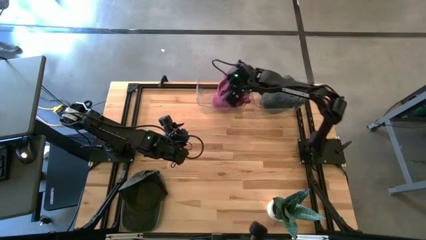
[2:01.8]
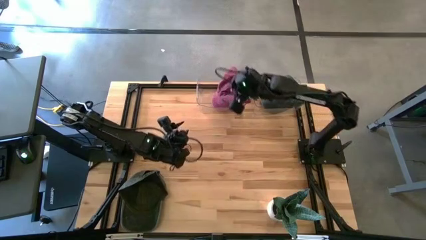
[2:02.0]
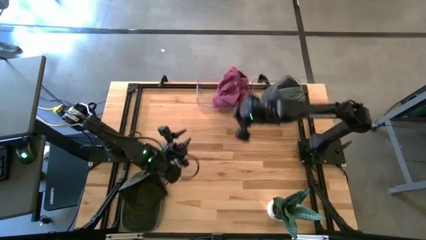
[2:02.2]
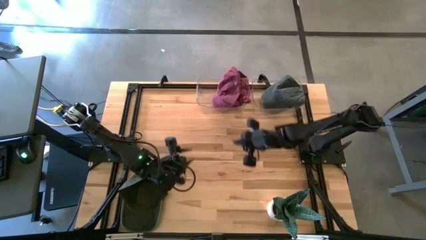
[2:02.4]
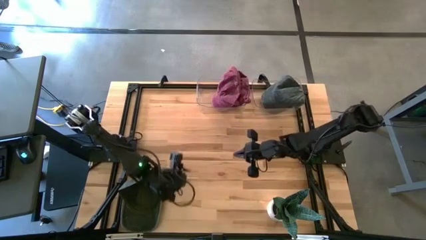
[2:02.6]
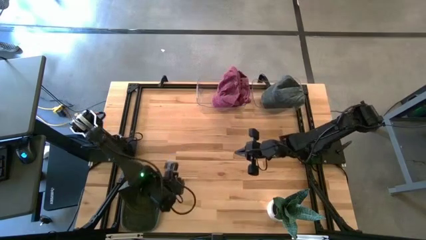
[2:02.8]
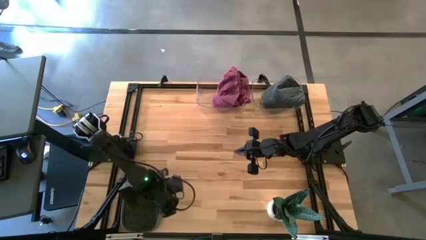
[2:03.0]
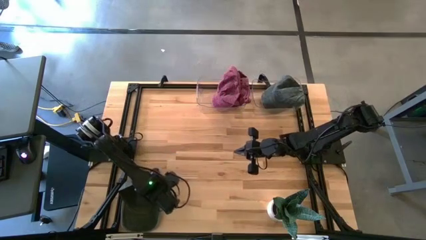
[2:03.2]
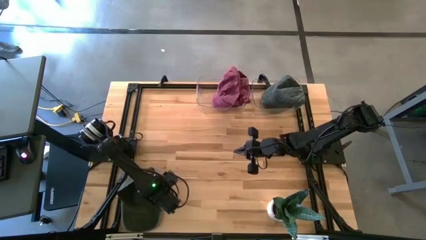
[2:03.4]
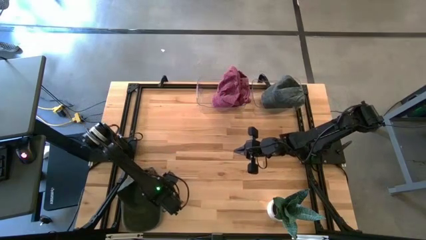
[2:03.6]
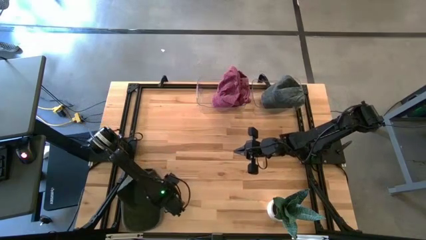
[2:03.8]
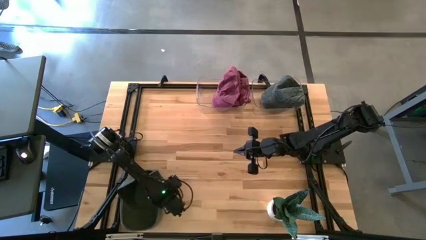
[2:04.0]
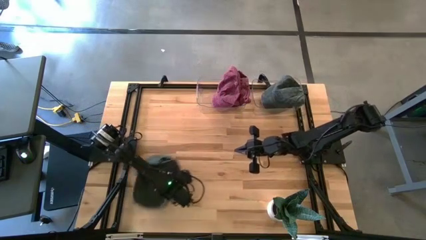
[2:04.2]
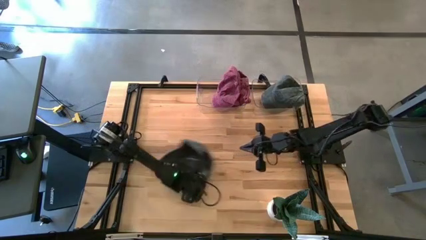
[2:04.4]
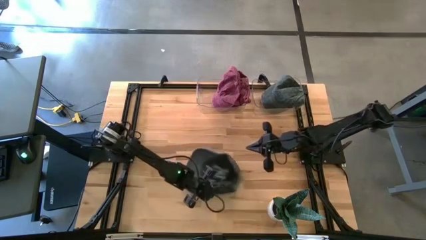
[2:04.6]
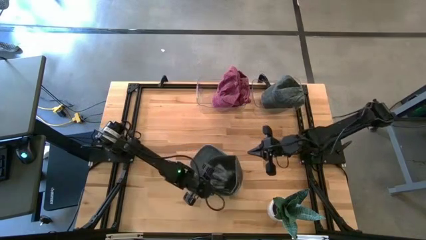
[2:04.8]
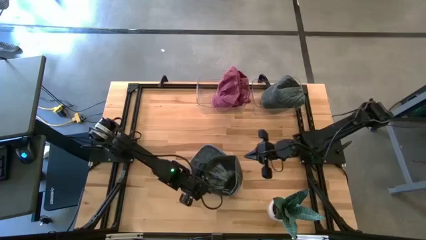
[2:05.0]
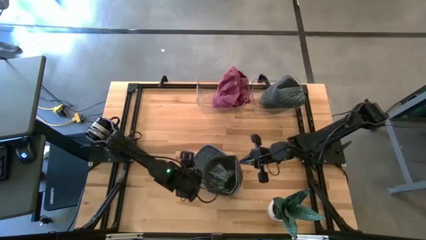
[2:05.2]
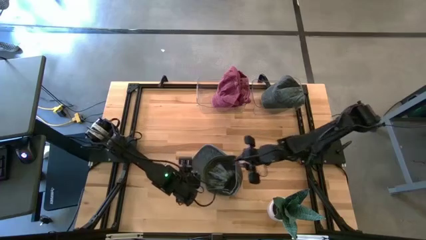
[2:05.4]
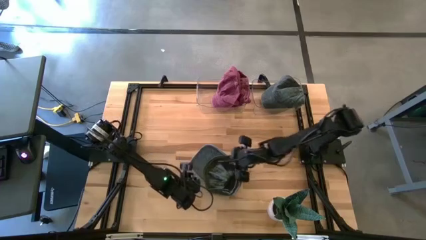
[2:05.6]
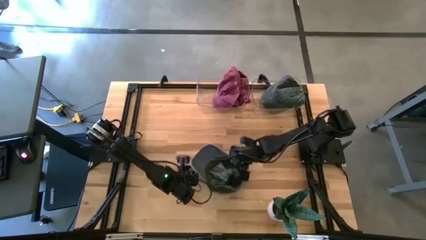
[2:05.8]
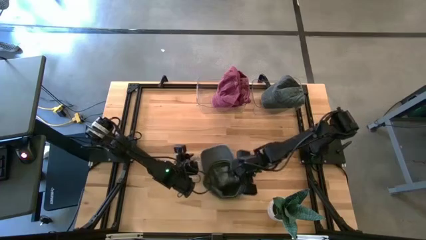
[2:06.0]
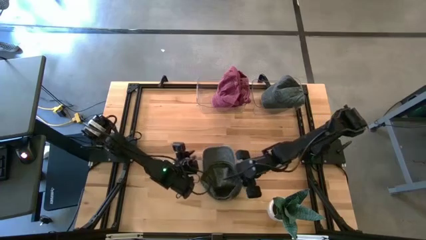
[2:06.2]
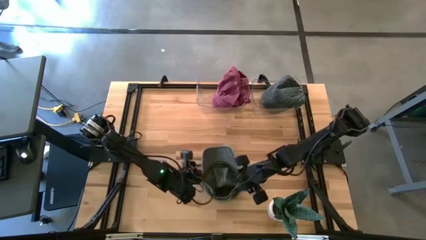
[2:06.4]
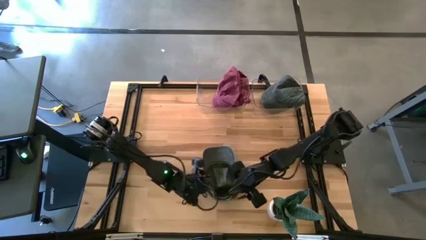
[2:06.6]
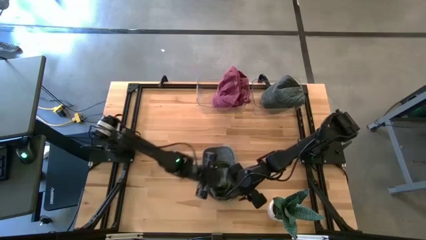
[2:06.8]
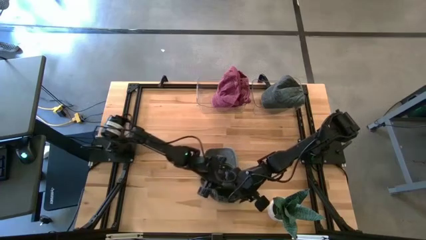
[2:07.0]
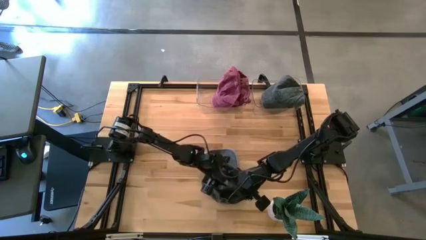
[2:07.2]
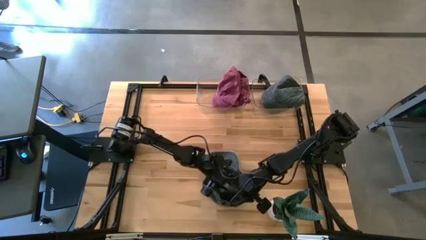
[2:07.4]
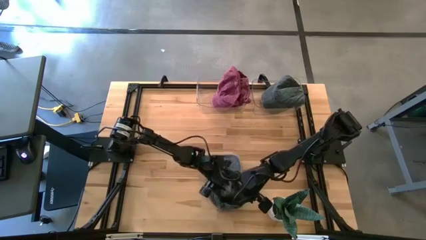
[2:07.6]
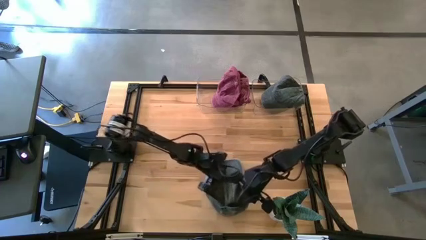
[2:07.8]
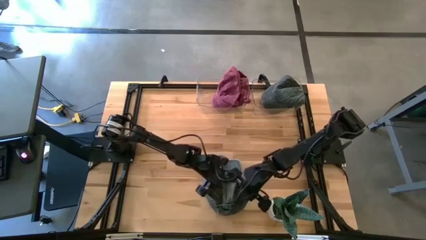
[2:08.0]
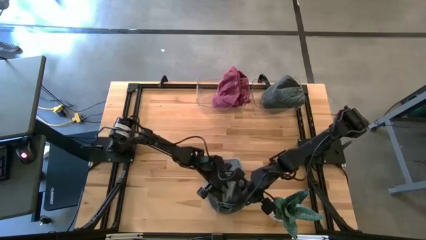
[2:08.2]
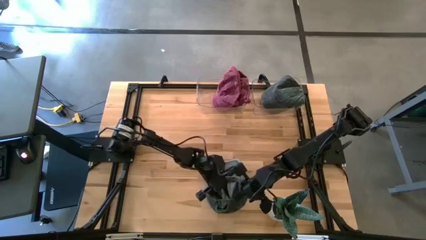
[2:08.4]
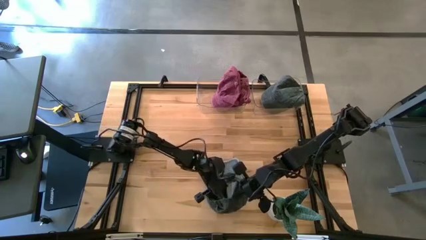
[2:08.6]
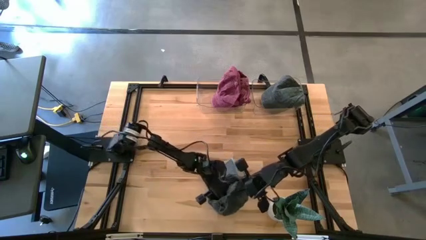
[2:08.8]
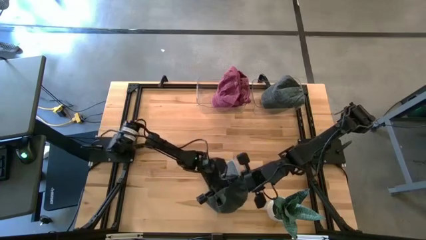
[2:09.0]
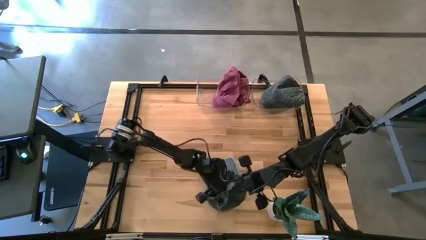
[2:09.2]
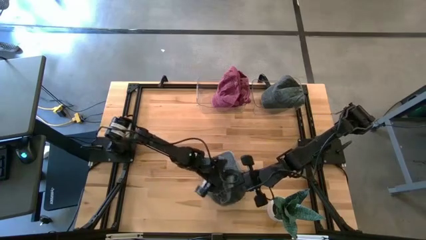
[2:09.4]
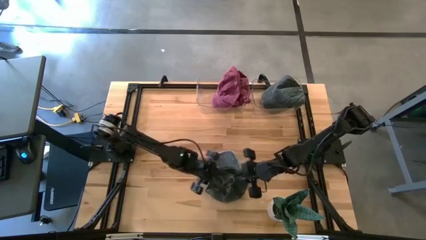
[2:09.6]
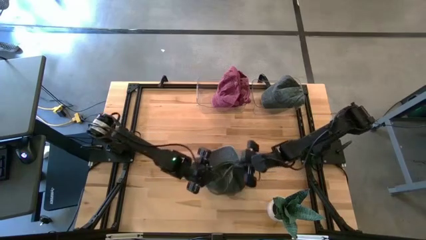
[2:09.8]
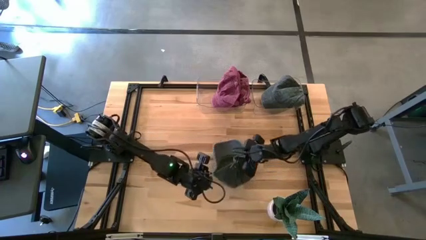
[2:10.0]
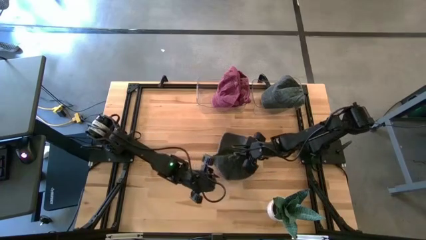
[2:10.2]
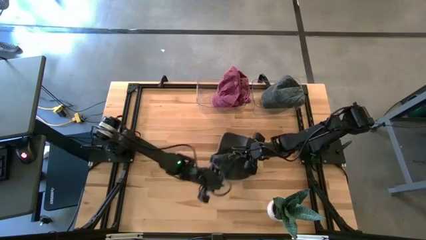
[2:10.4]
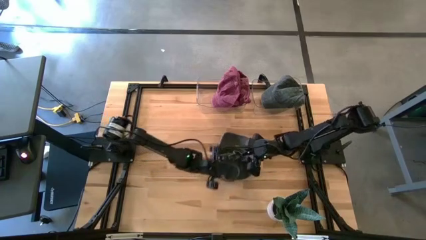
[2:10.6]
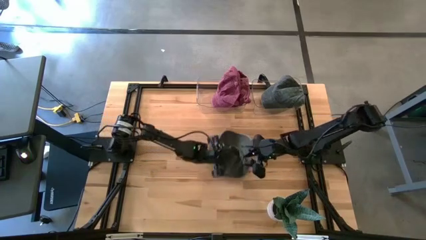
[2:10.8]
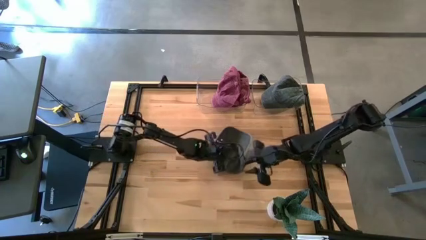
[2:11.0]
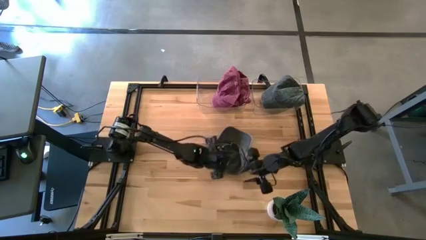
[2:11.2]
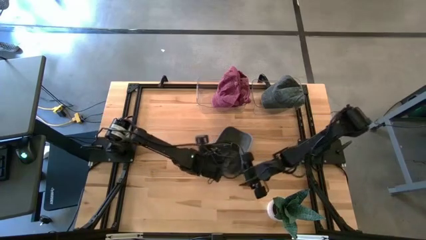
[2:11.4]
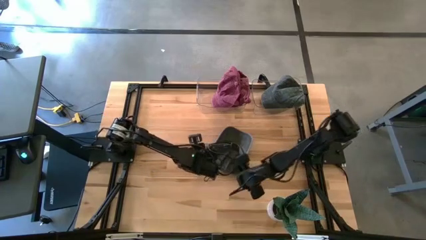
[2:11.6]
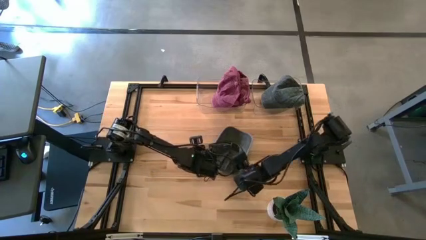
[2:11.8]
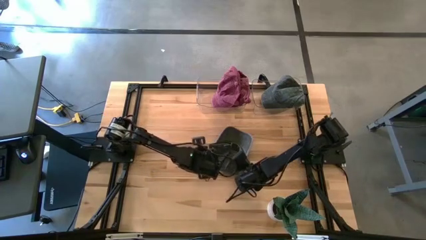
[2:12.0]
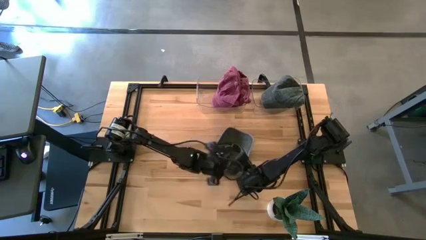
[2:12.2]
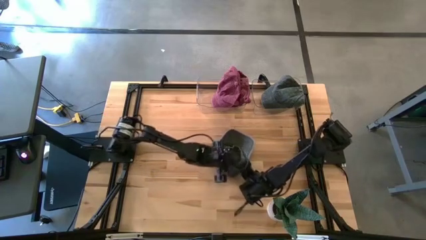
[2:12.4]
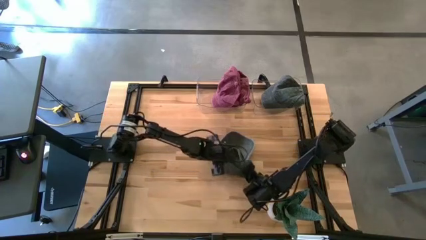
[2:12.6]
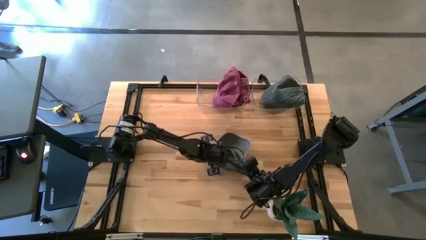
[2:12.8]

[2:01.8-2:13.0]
Task: Pick & Place hat
Put the black cap into the right transparent bin
